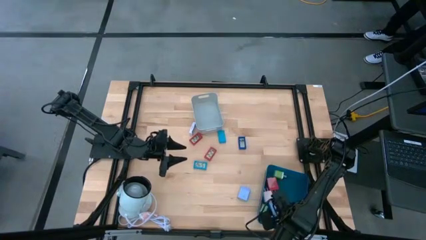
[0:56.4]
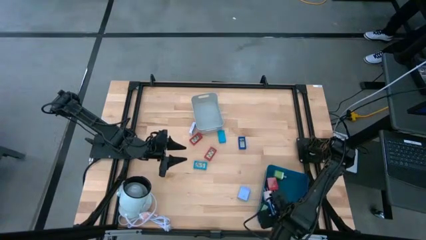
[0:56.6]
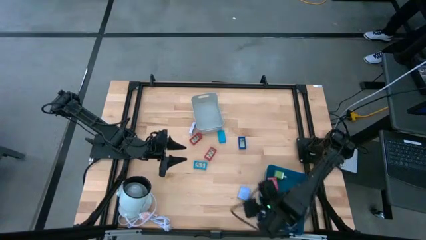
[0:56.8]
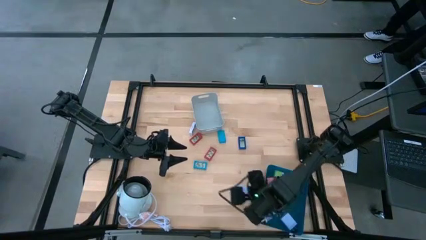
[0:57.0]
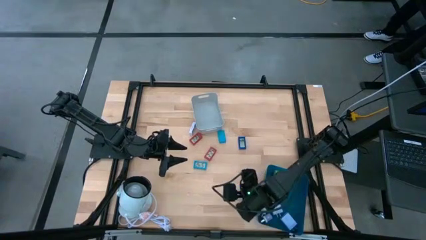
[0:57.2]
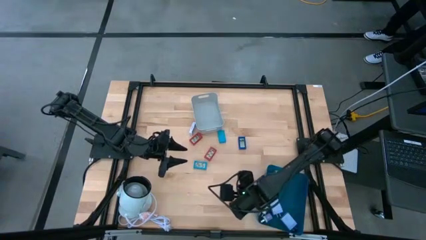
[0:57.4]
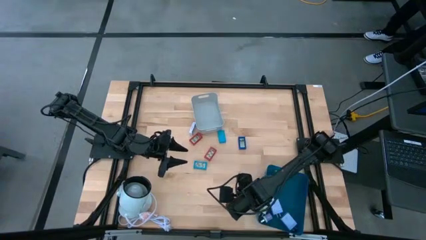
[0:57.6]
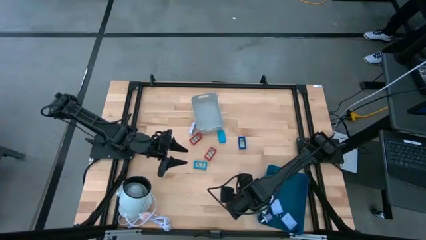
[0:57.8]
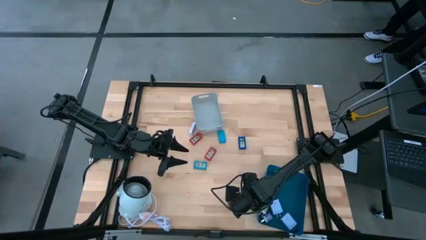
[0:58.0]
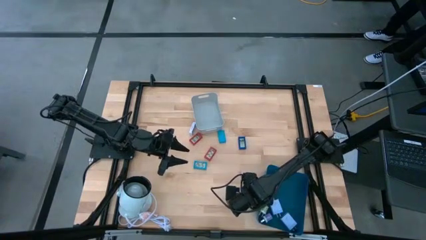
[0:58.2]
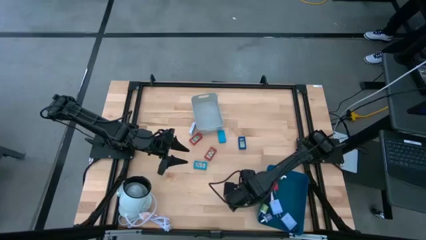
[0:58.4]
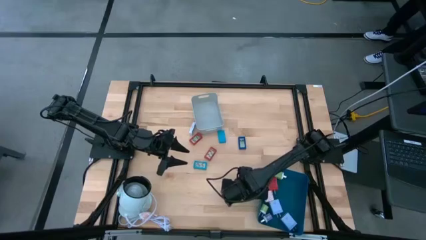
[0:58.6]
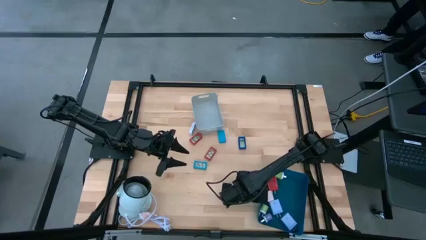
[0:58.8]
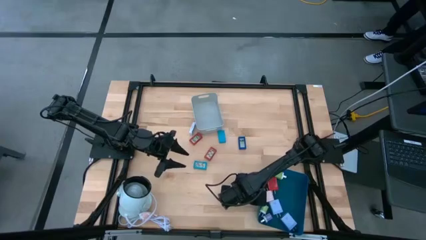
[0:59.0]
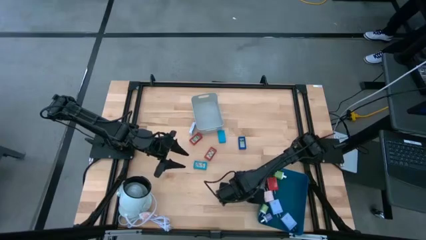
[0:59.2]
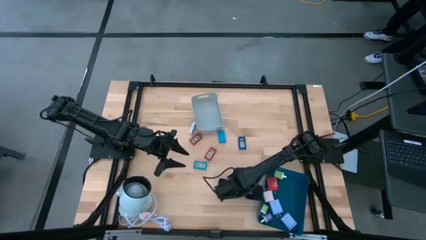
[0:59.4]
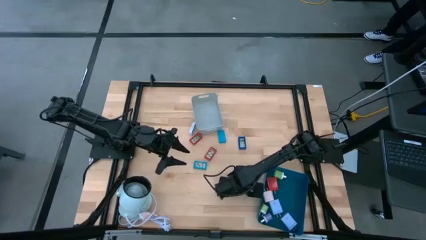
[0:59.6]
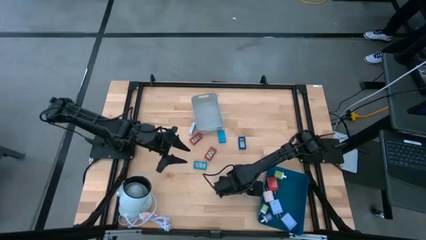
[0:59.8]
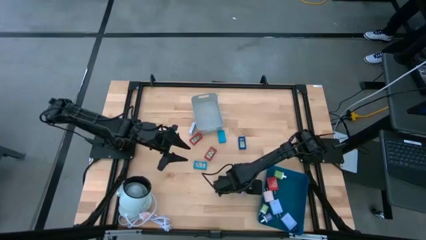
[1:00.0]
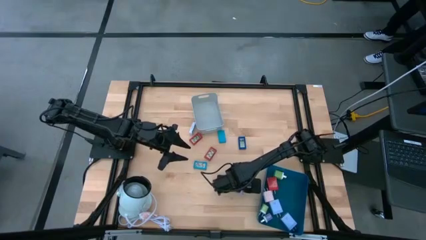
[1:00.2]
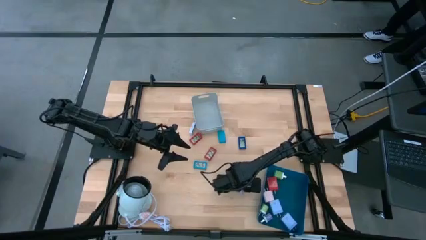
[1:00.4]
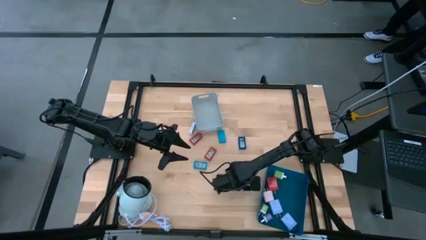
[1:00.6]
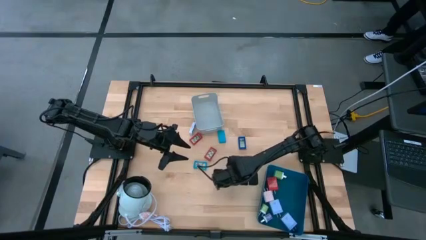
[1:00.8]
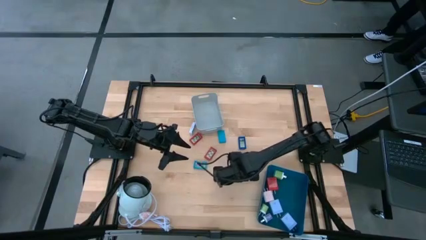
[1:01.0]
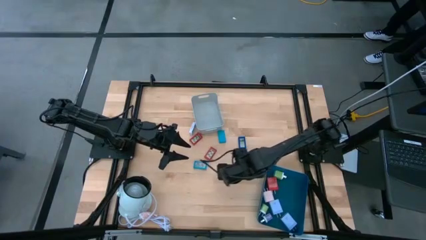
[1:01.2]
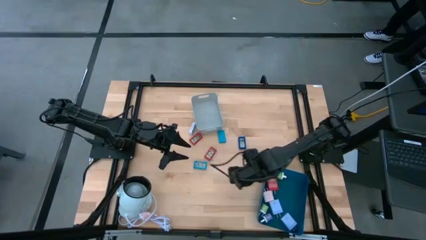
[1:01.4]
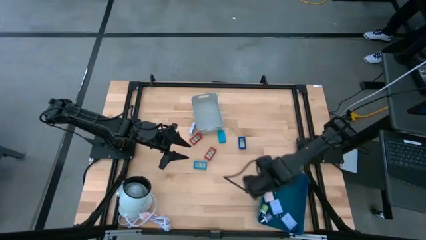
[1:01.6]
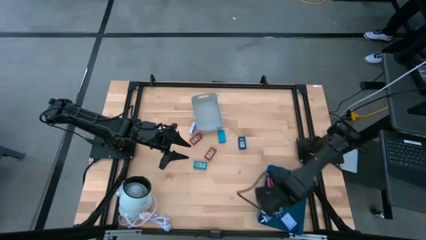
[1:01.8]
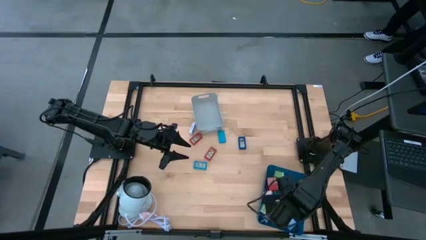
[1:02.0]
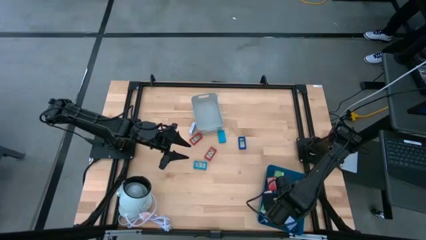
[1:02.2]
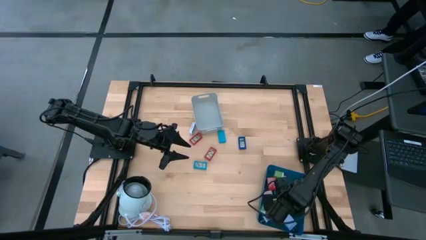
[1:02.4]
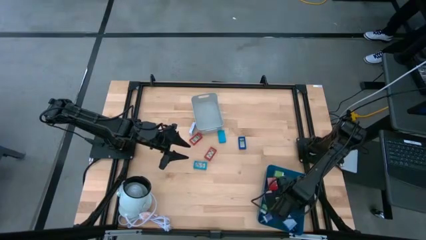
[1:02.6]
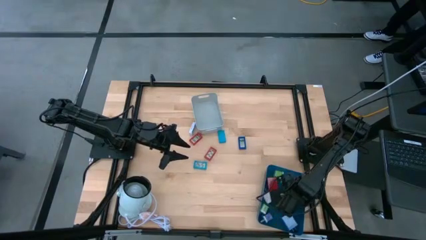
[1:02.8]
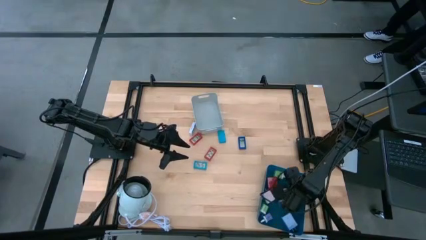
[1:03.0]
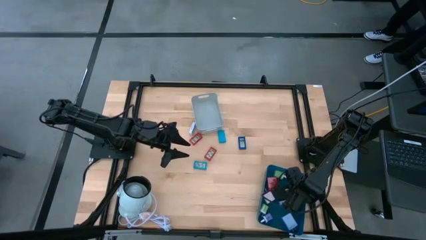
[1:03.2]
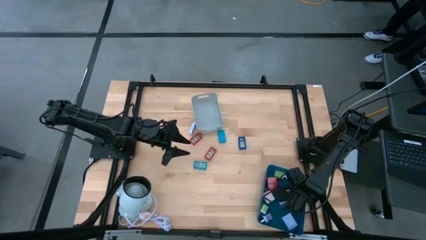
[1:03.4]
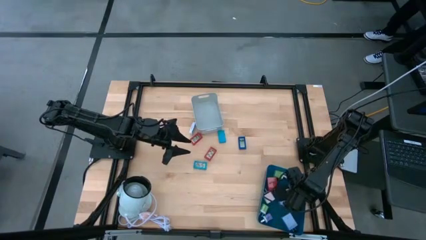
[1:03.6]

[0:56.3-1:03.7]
Task: Pick & Place Office items
Put the blue charger adapter into the blue bin

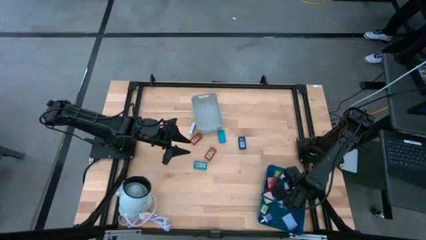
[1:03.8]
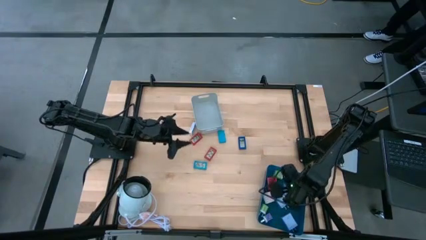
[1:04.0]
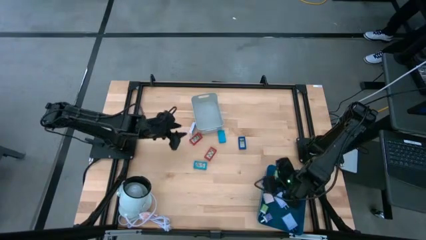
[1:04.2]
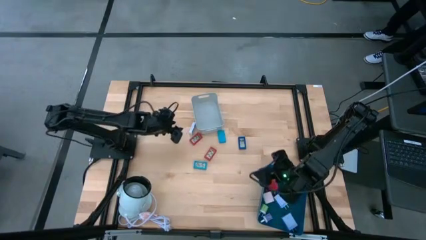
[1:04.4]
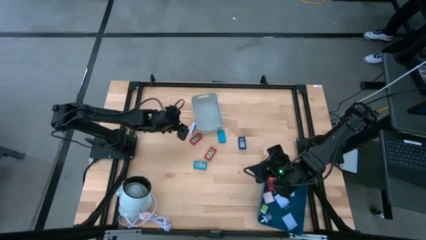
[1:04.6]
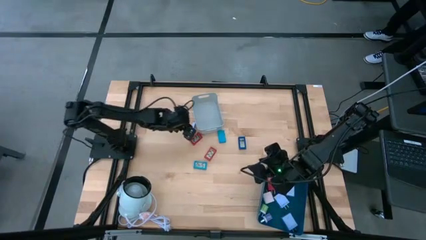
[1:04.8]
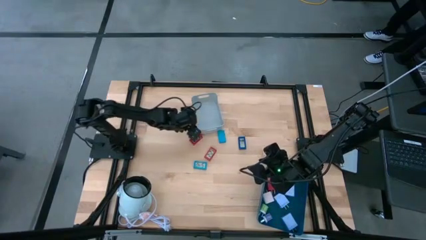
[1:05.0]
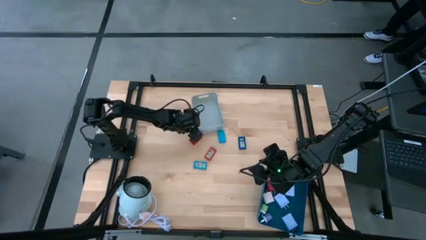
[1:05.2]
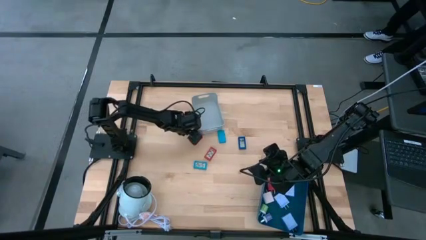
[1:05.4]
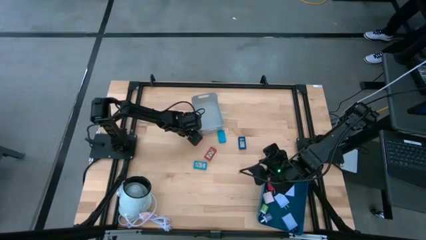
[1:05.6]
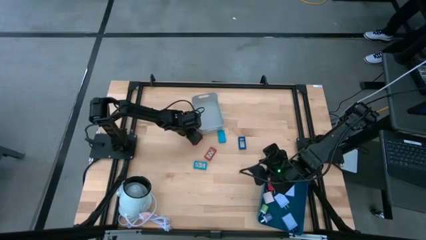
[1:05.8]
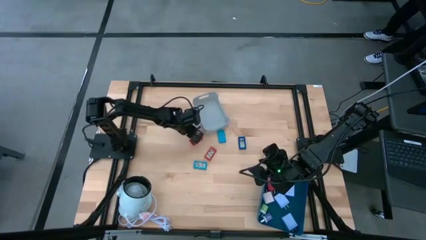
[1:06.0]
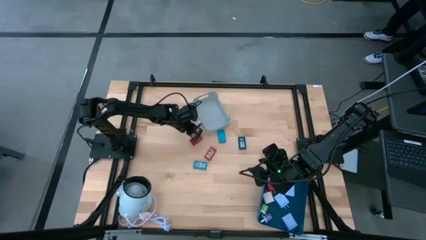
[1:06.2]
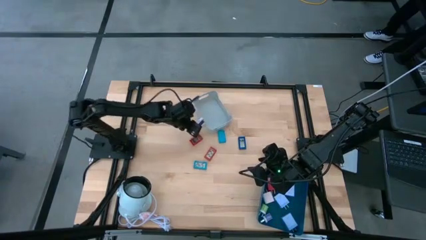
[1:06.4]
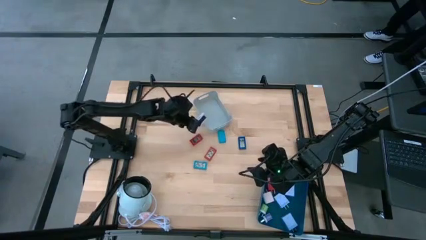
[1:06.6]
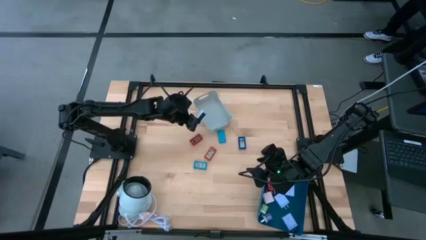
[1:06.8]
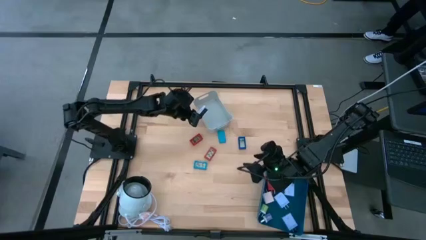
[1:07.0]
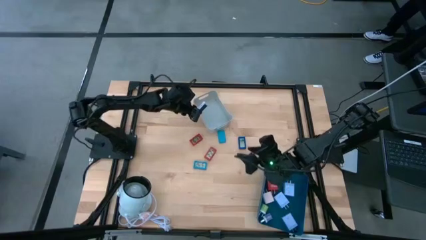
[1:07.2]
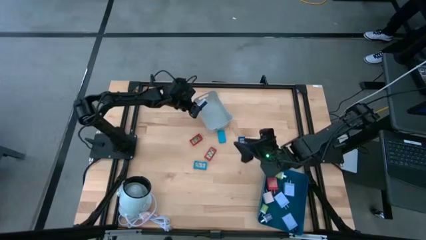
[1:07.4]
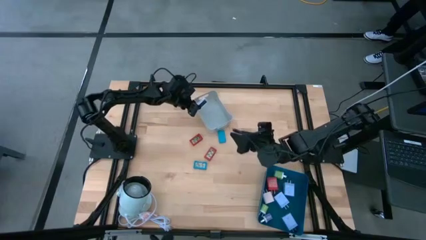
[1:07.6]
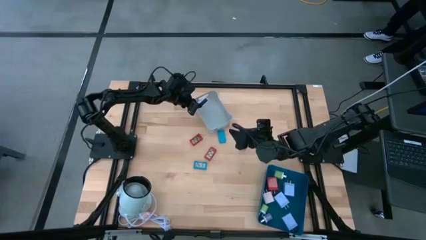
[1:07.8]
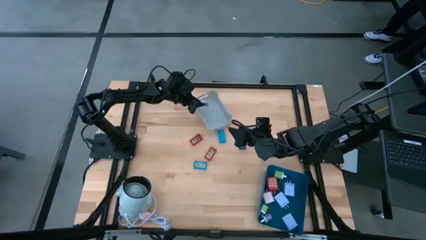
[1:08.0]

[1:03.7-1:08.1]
Put the white digital clock into the gray bin

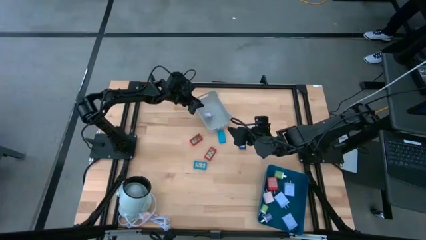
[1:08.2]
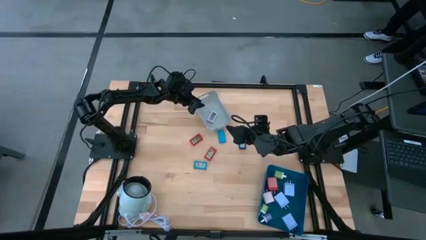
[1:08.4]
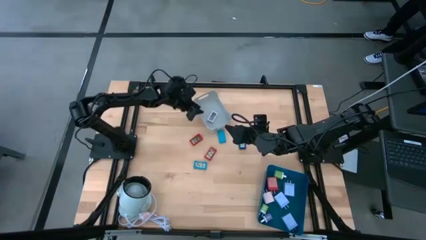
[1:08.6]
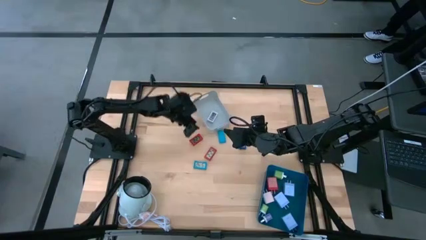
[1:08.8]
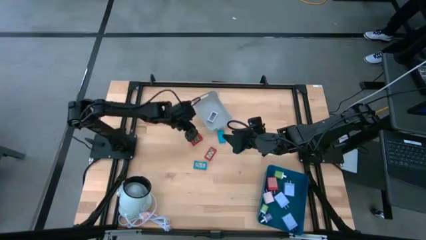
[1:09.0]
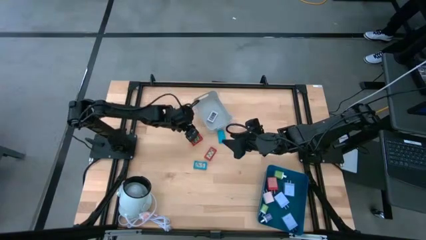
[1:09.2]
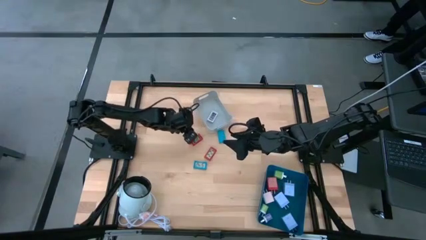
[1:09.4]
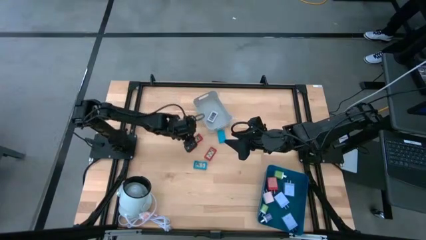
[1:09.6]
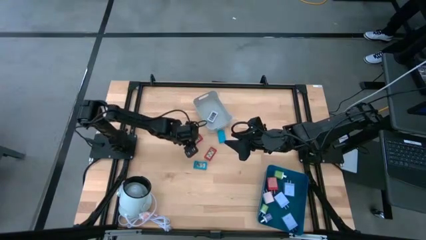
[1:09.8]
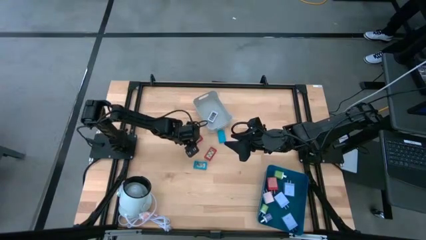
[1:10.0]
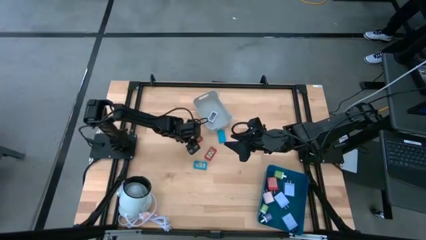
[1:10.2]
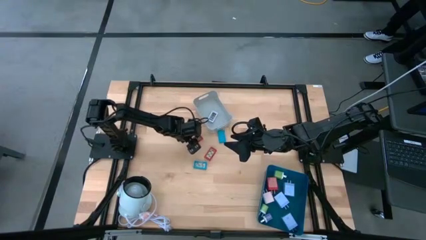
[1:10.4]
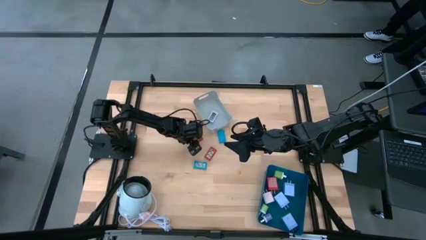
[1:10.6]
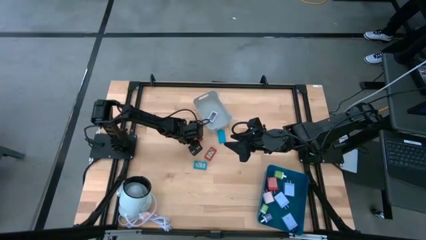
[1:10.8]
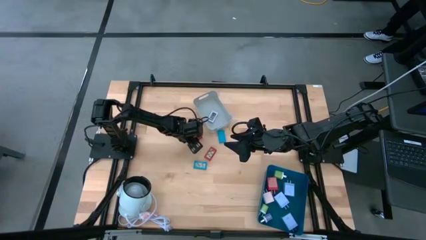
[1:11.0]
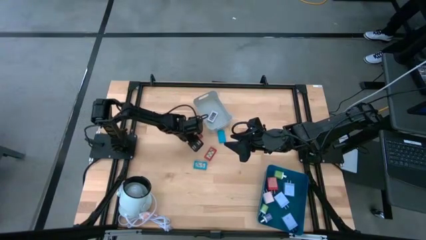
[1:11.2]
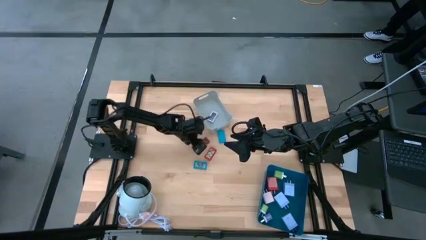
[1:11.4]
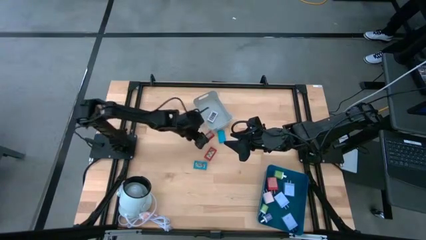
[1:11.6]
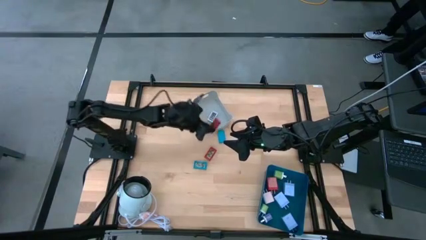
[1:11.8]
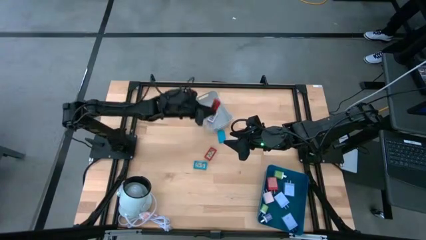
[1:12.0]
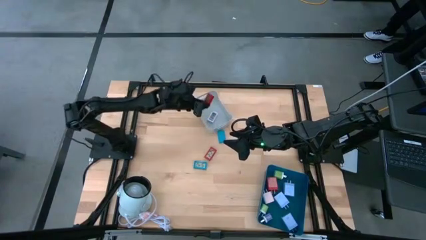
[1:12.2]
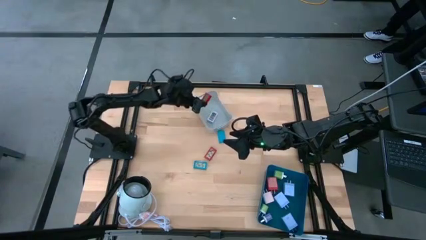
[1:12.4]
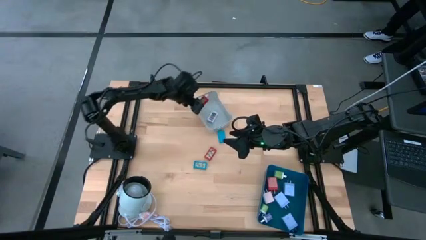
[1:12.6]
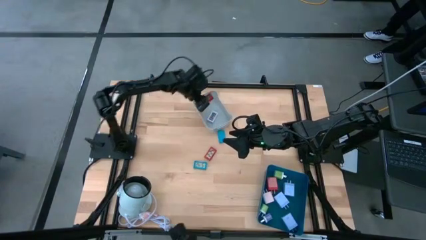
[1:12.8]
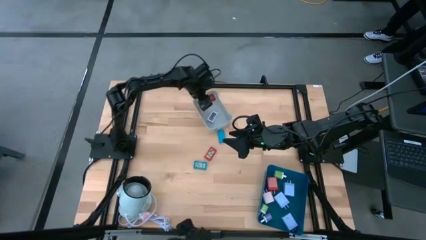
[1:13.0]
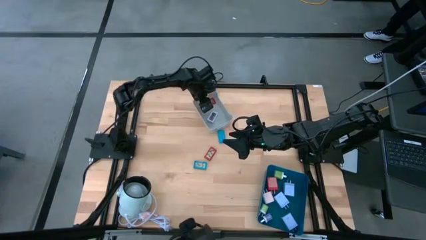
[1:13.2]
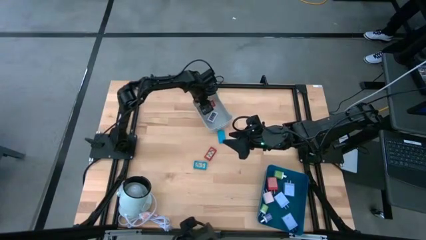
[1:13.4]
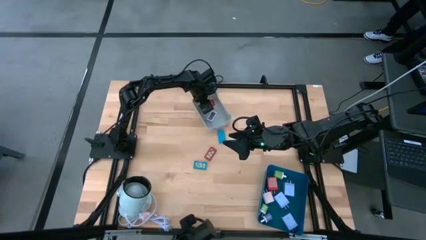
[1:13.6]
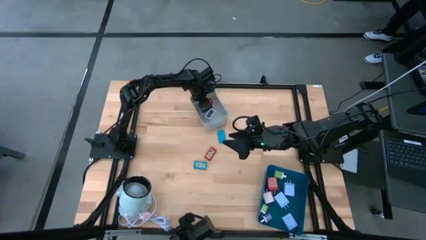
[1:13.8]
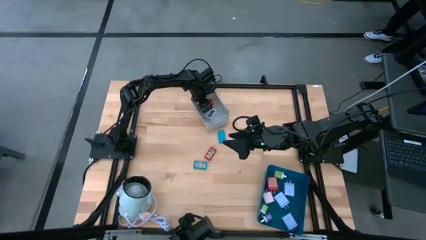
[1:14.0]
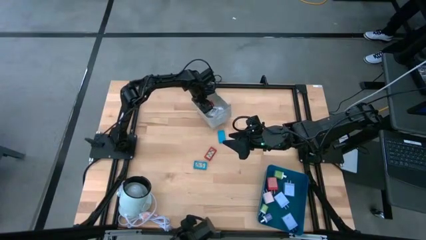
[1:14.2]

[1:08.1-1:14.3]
Put the left red digital clock into the gray bin
